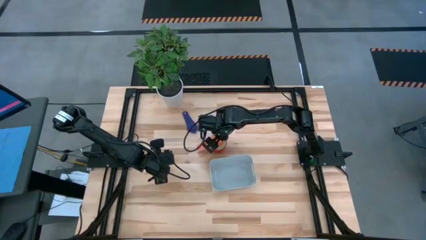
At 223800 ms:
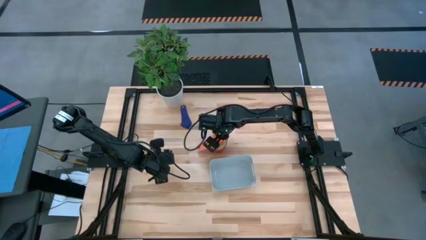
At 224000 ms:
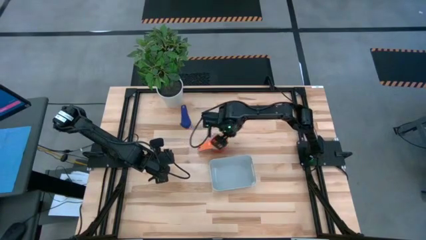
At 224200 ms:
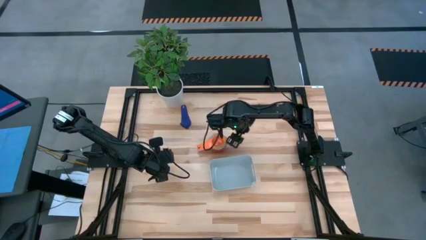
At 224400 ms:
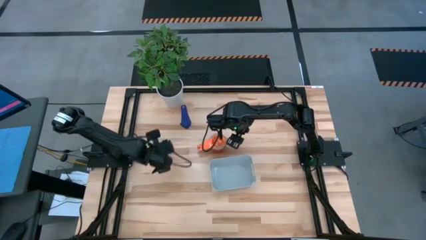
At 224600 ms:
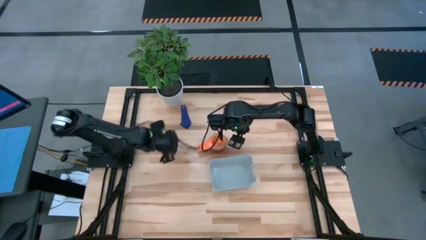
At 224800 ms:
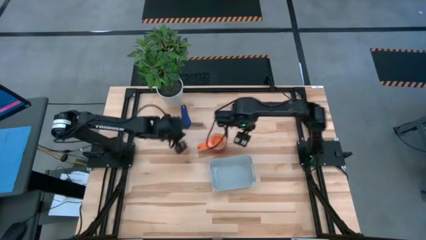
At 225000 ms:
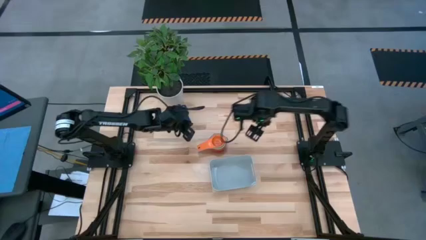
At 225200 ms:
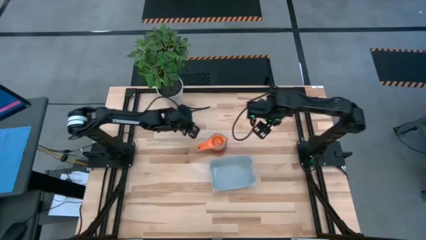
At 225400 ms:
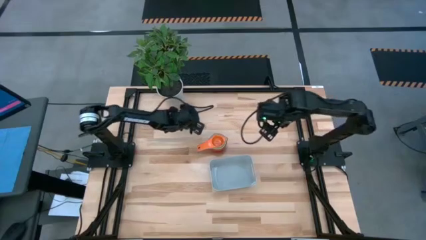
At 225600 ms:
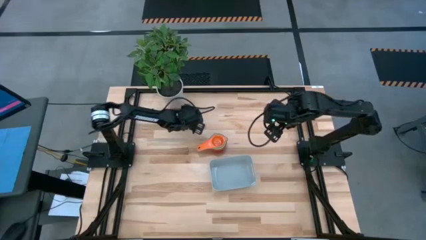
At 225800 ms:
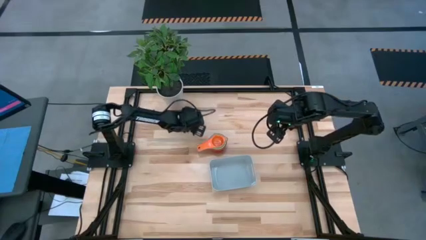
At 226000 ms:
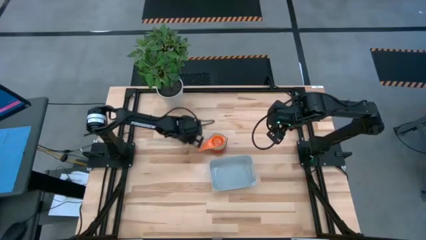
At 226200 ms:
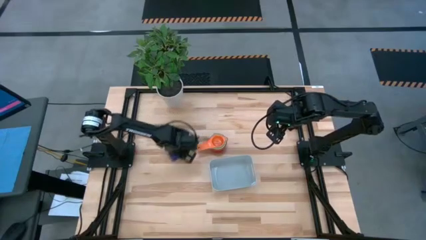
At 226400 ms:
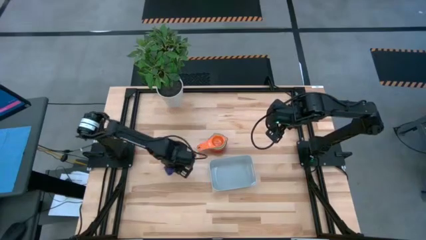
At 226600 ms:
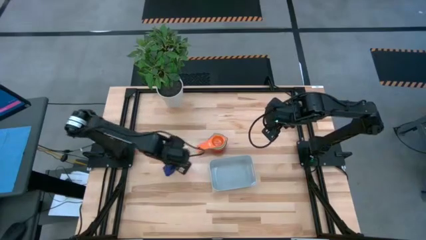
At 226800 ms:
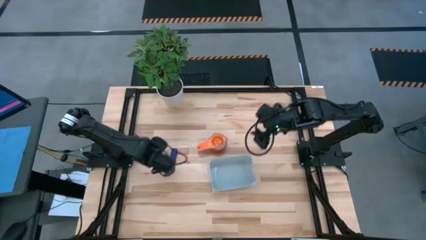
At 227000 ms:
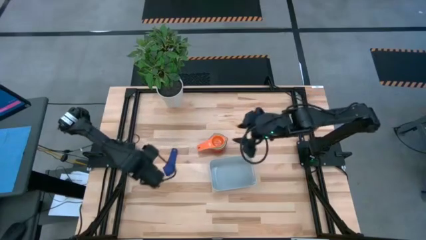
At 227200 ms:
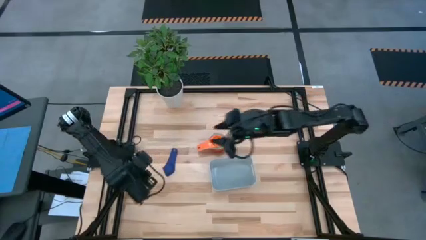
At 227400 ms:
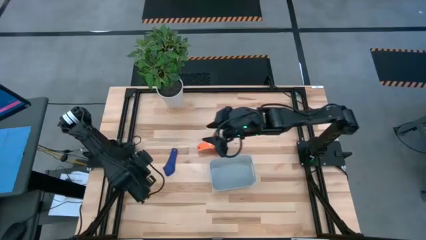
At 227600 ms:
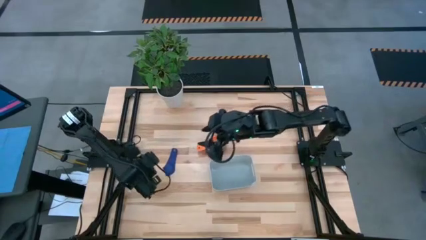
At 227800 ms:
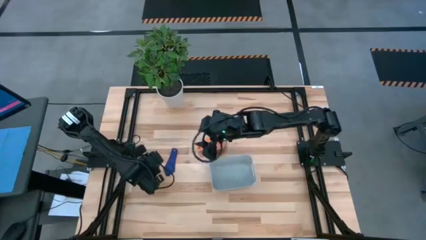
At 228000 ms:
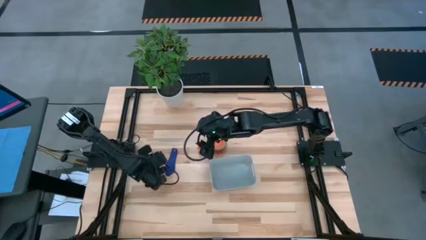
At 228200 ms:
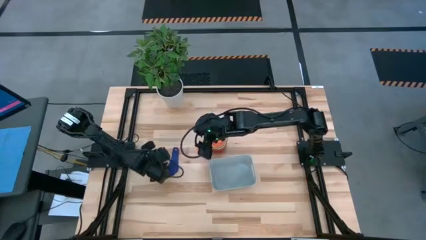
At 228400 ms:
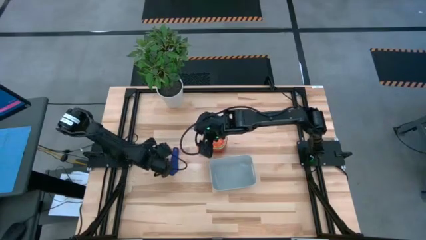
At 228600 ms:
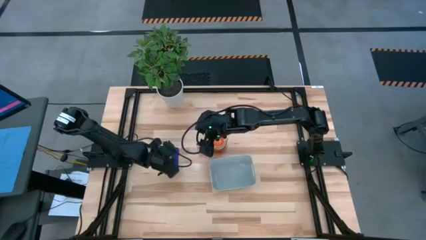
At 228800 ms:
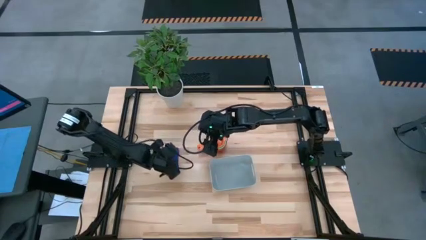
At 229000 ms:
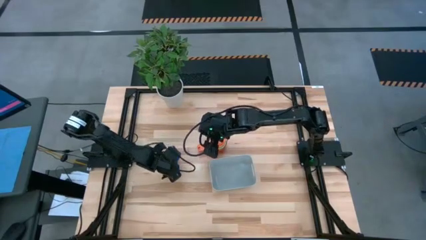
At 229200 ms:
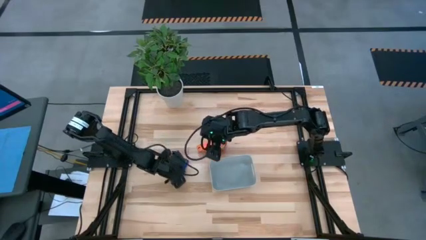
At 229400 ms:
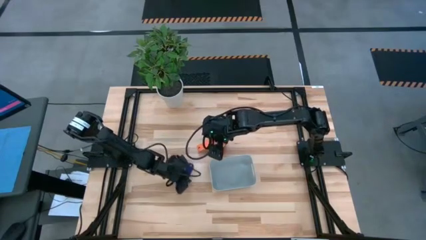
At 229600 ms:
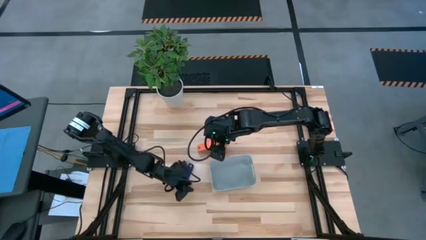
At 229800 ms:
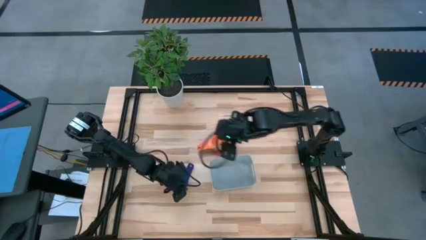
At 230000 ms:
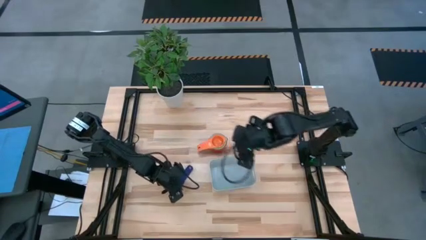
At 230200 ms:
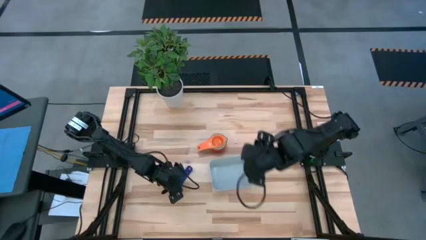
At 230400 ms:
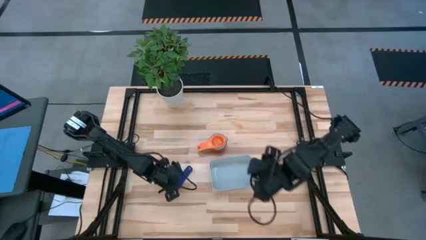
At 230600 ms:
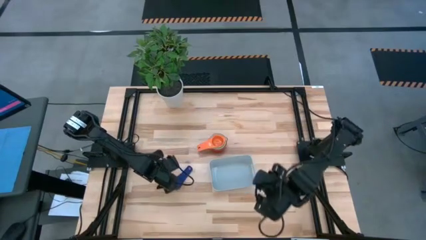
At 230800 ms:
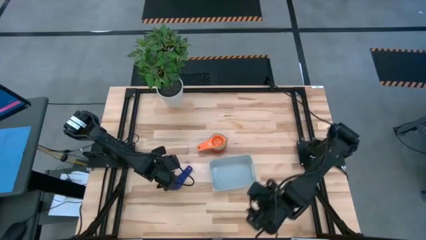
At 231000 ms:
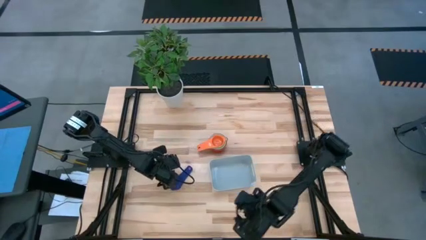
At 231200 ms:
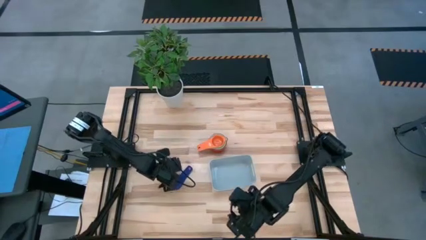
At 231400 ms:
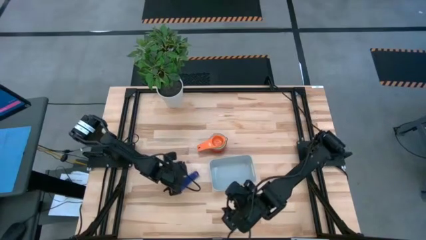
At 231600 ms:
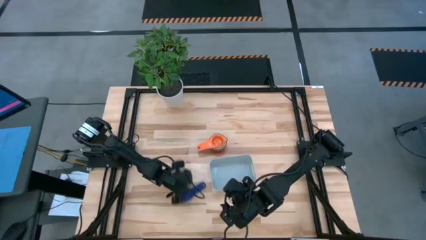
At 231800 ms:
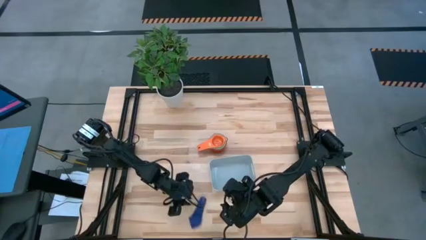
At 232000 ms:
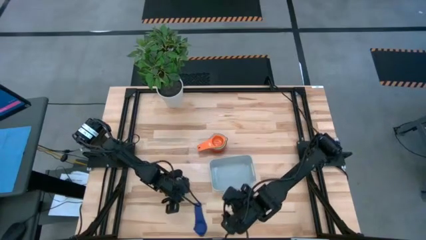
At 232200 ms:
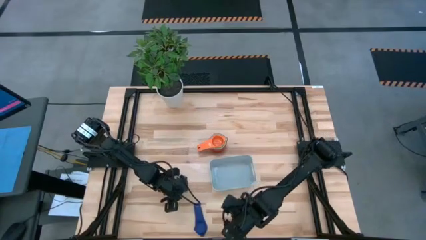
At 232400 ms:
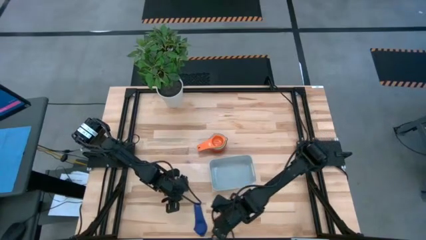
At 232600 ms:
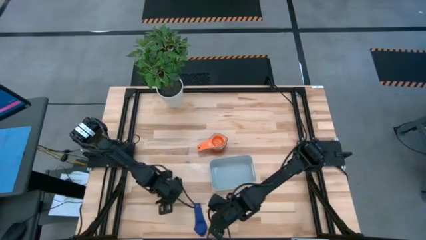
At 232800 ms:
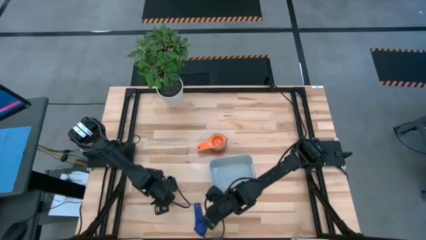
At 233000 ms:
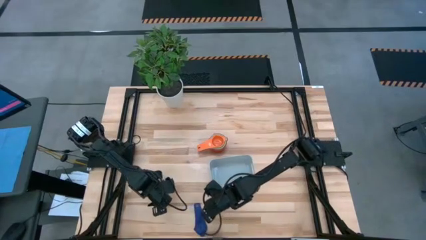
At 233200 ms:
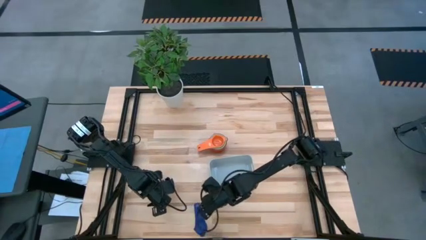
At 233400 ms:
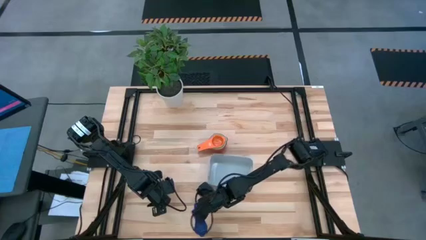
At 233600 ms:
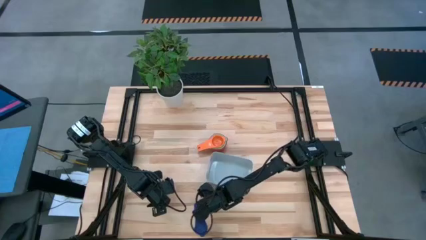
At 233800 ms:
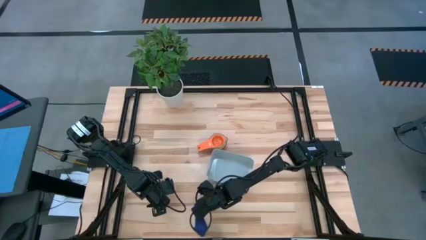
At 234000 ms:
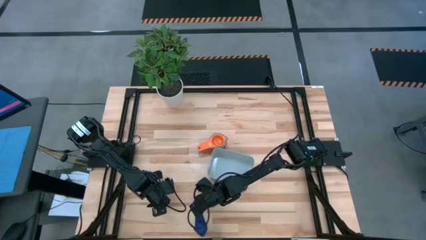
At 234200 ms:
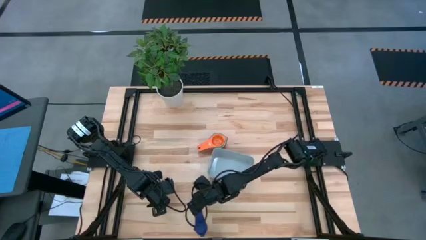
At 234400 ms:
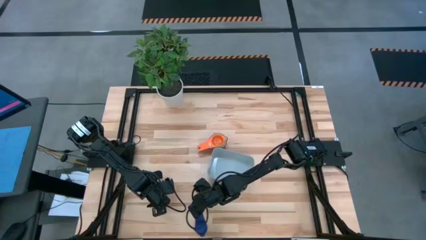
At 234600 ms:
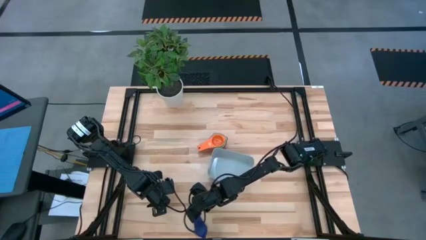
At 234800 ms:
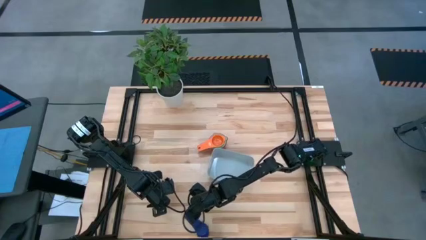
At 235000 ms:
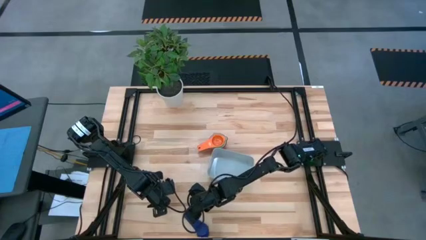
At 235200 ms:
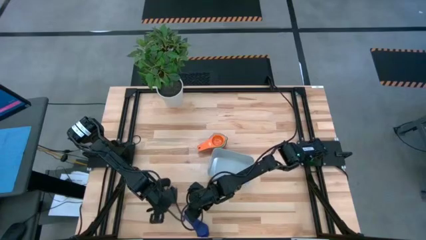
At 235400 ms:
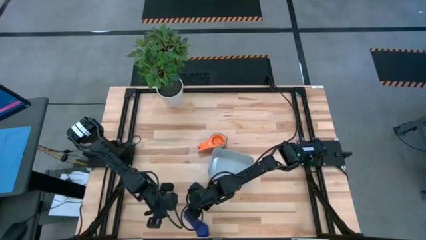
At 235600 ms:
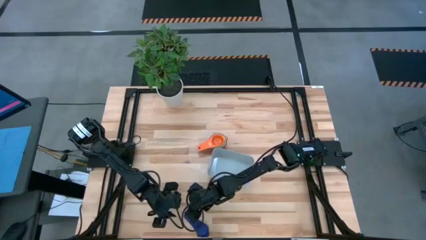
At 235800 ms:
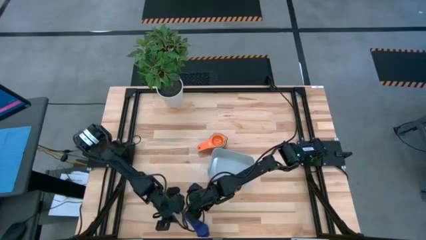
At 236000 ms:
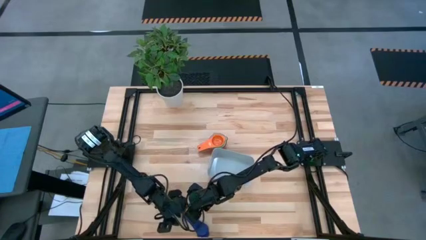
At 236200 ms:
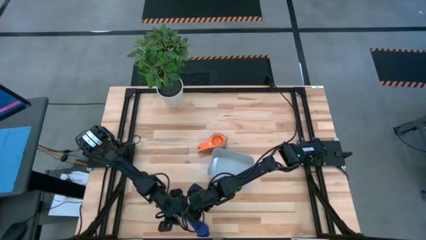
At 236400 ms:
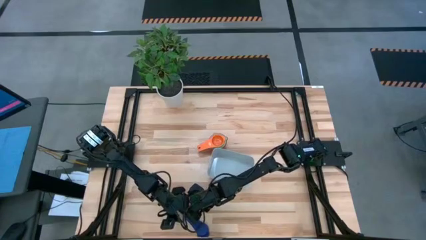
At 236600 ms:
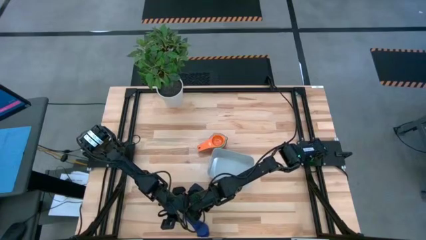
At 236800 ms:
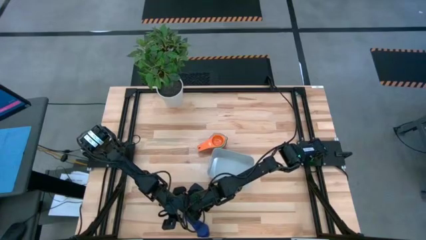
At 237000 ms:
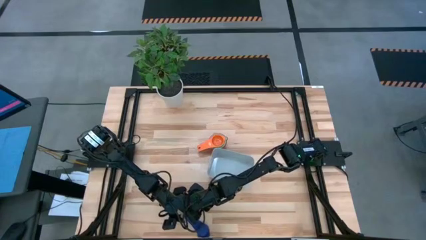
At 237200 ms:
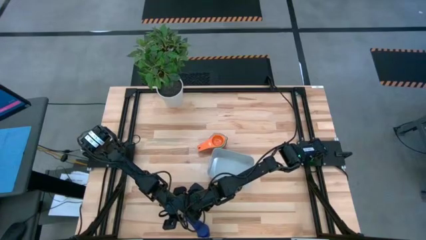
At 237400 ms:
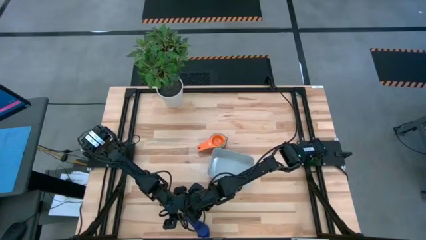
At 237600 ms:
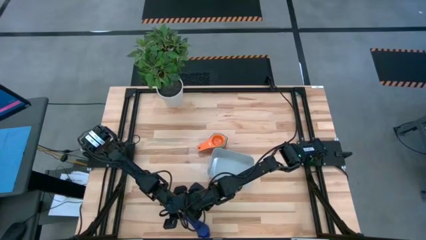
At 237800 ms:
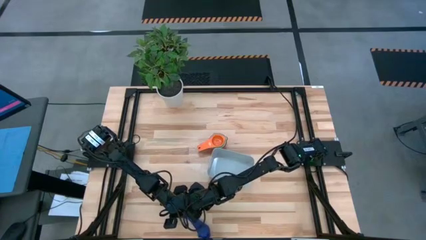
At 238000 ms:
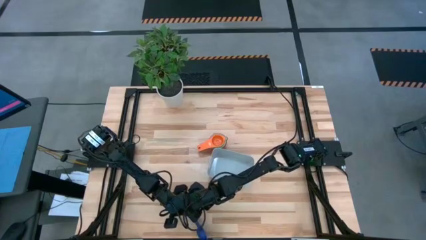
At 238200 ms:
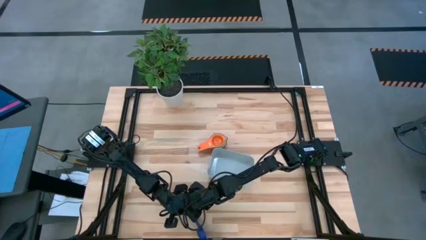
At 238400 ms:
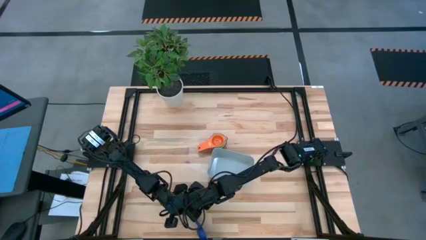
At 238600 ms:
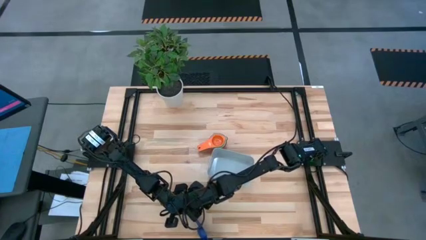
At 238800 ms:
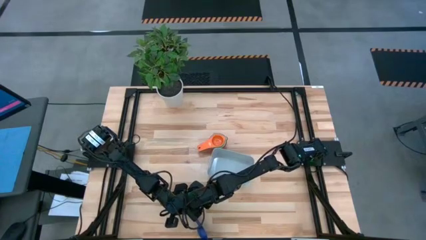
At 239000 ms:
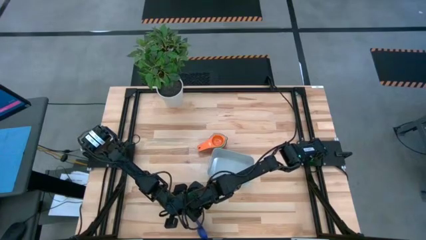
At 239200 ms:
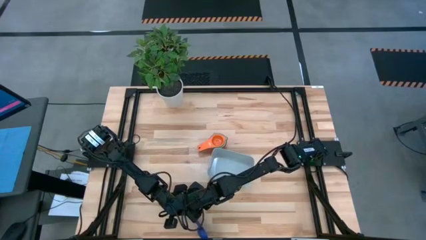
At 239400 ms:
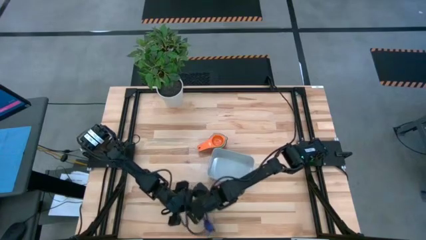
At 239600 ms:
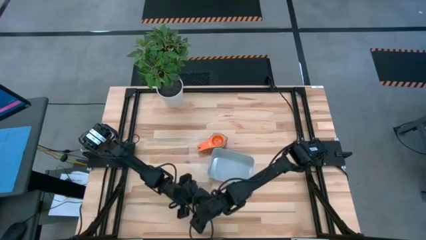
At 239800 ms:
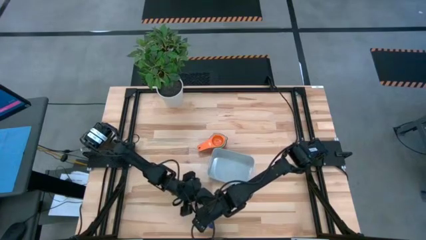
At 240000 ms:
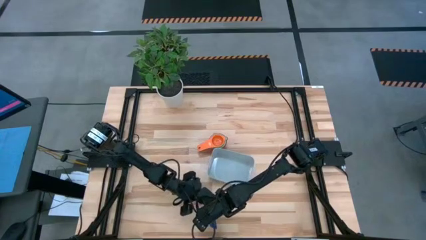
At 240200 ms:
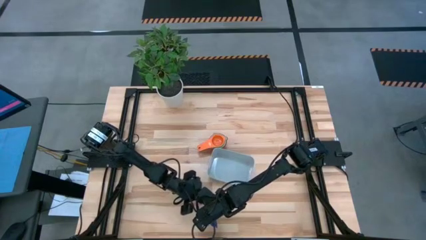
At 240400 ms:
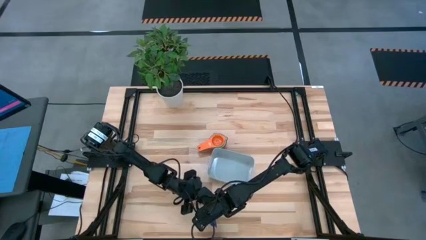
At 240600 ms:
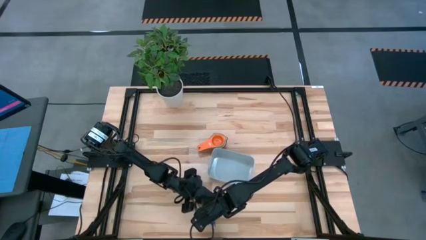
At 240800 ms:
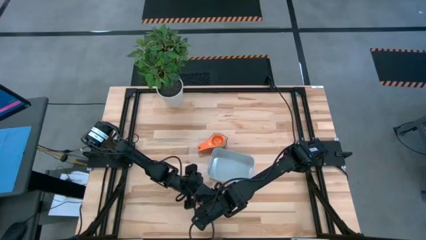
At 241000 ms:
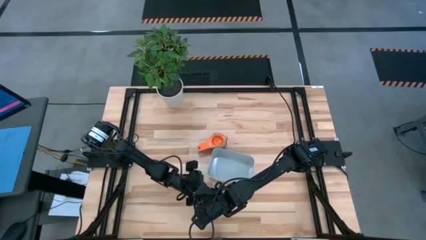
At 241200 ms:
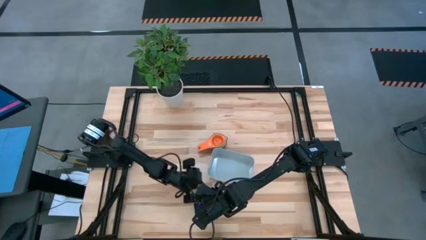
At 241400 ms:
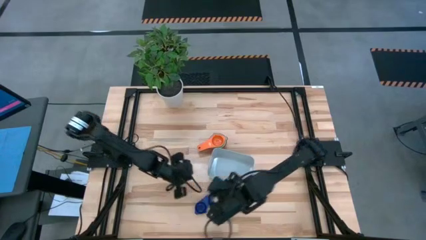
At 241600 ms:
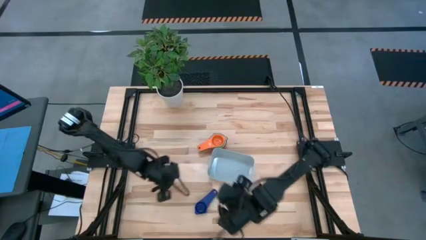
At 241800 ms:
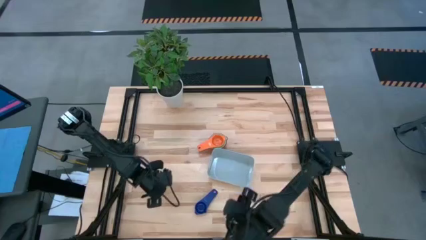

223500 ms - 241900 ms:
Task: Nest measuring cups in basket
Stack the dark blue measuring cup on top of the orange measuring cup
